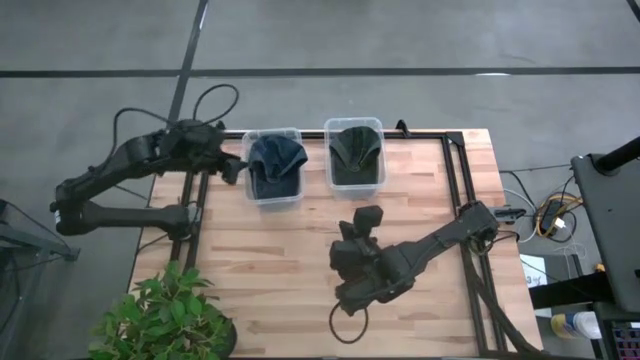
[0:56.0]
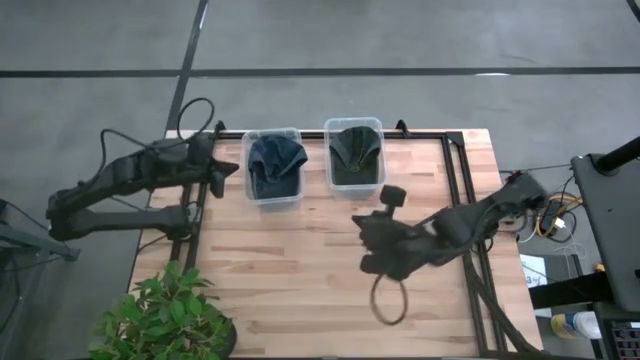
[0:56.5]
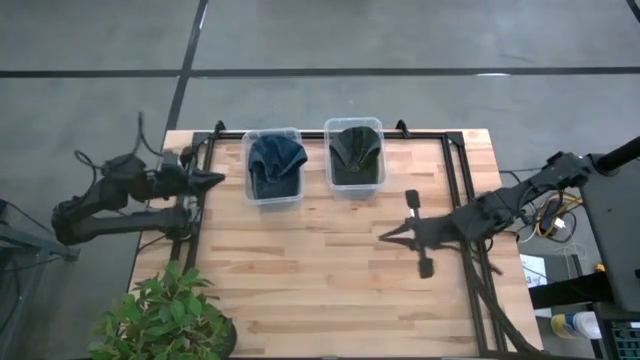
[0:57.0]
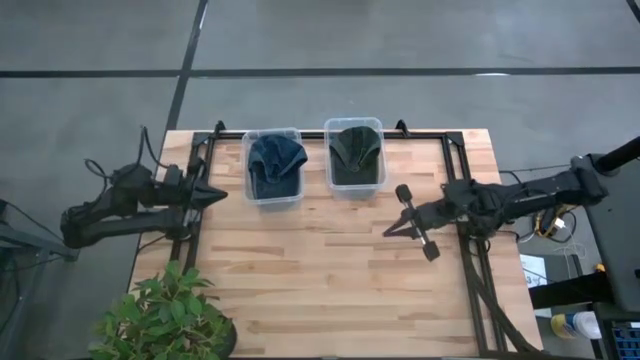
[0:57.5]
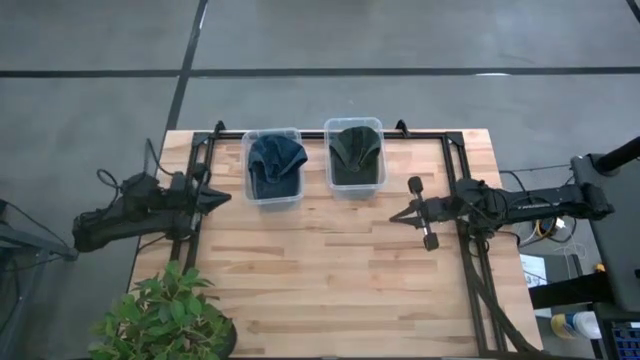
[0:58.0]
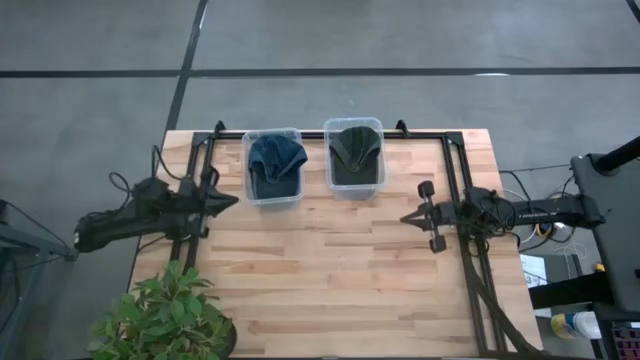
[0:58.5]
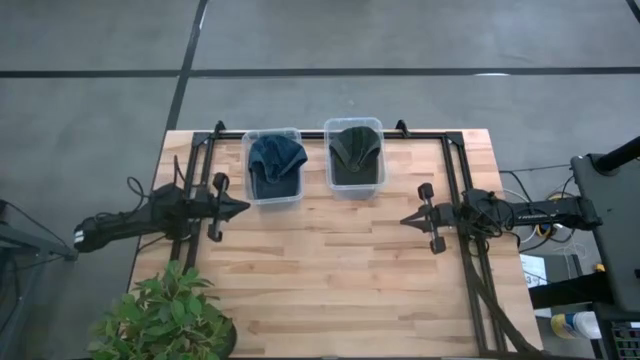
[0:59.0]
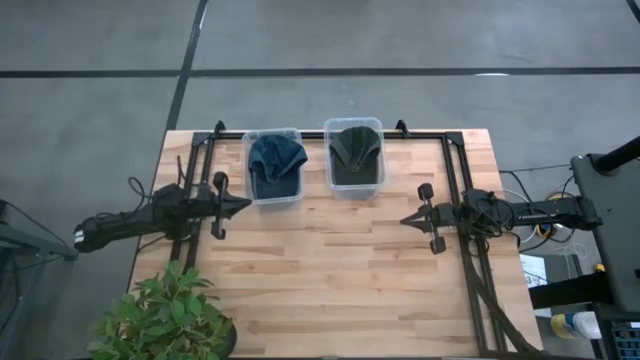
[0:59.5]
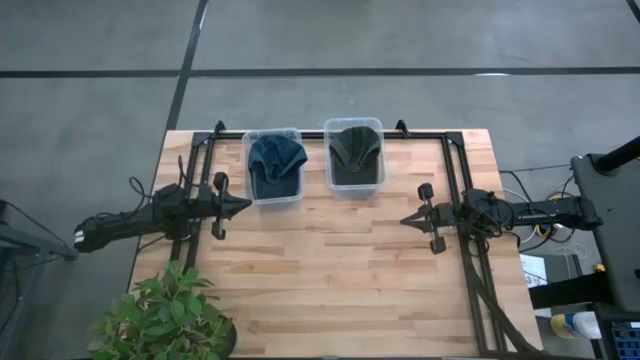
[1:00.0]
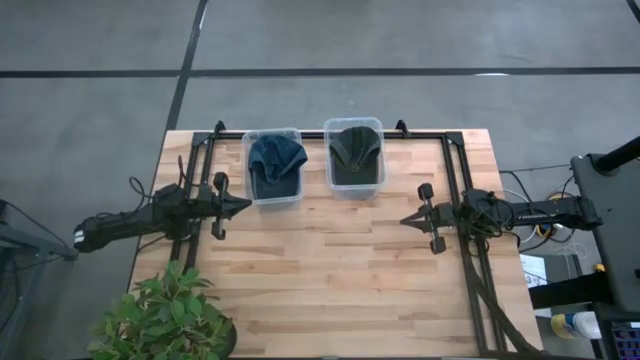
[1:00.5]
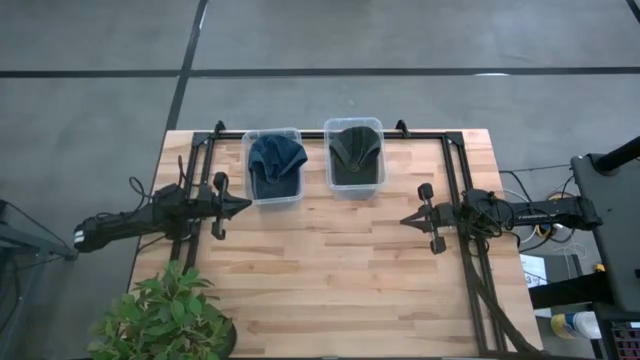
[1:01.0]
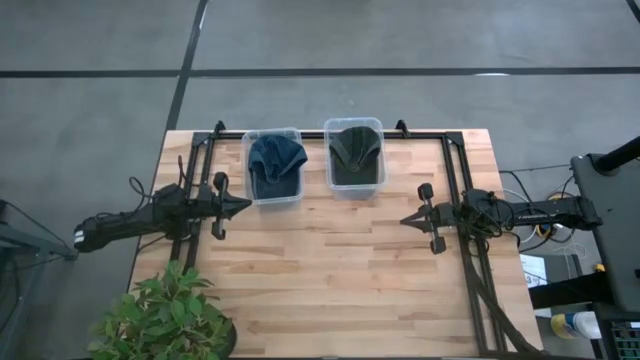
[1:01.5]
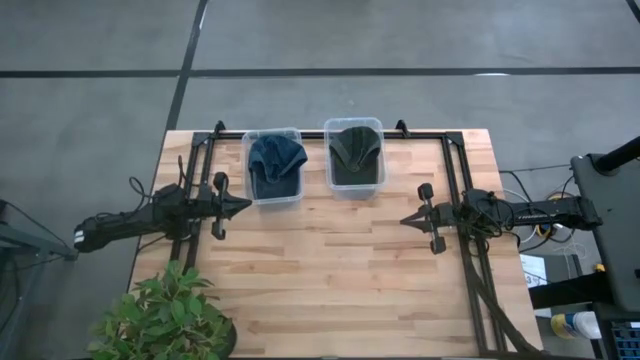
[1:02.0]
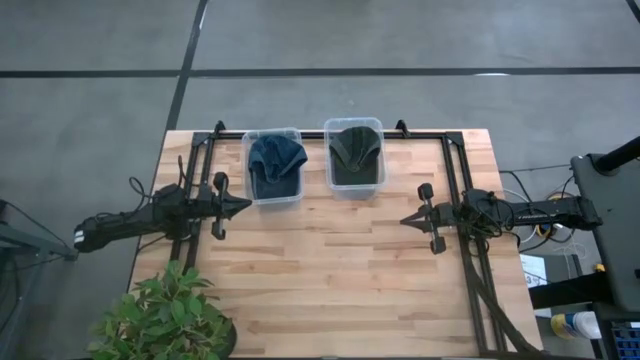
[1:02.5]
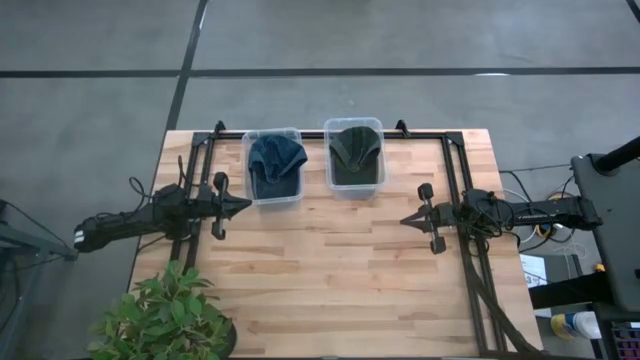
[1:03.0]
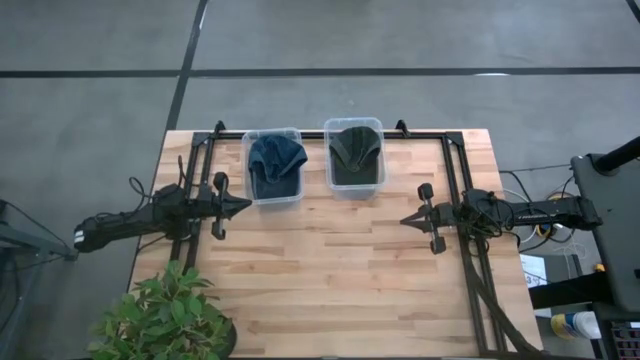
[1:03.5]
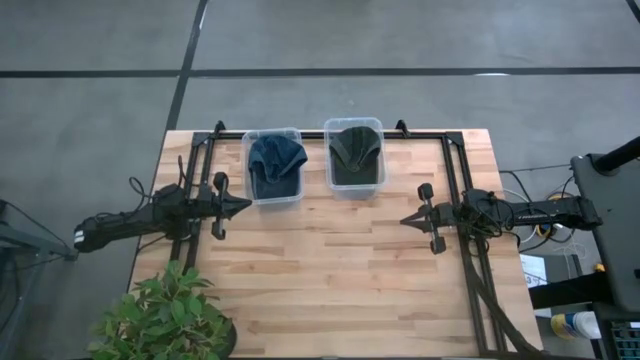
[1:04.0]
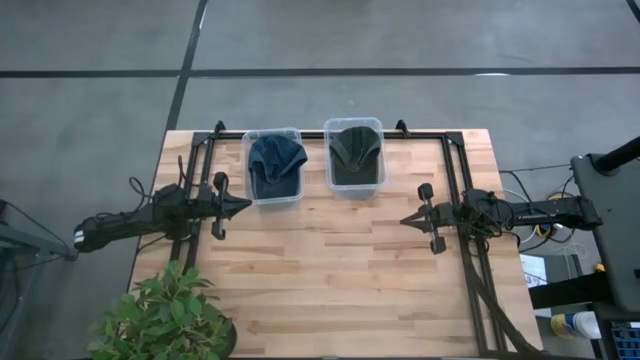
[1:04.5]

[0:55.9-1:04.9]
Task: Pick & Place hat
Return to Home Position

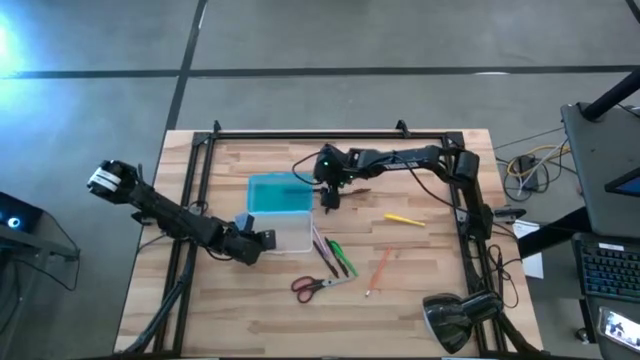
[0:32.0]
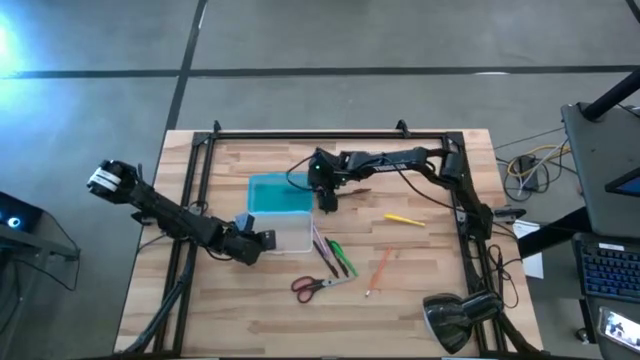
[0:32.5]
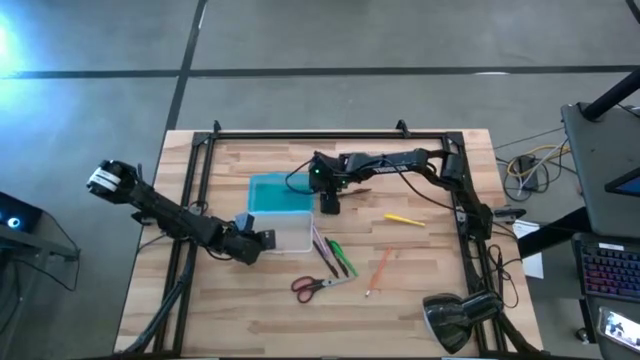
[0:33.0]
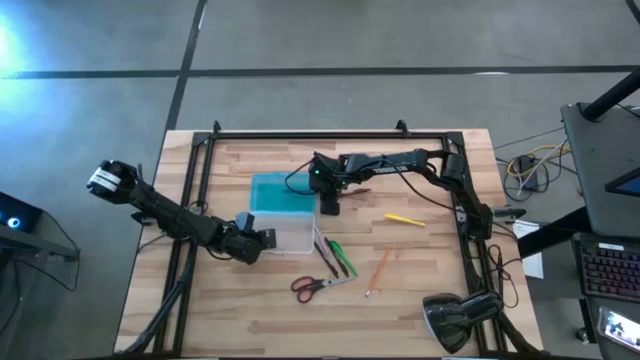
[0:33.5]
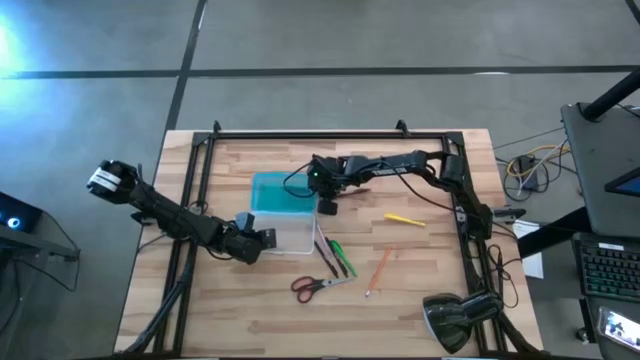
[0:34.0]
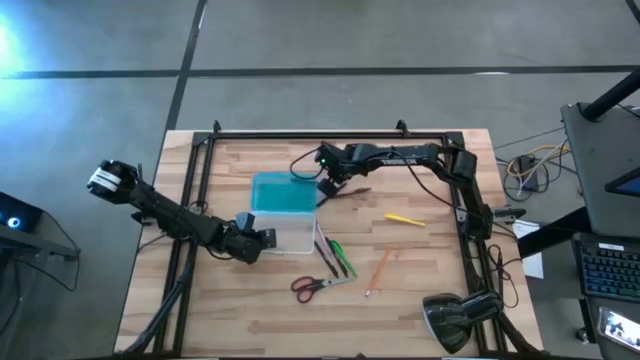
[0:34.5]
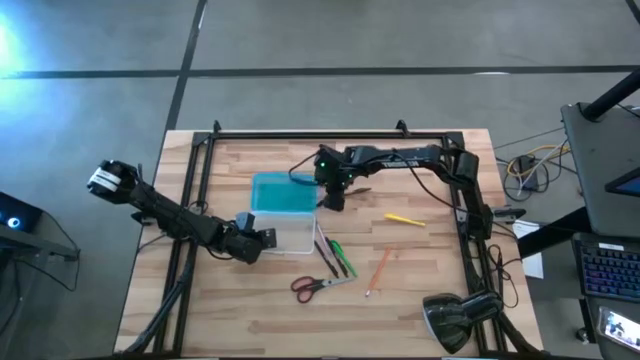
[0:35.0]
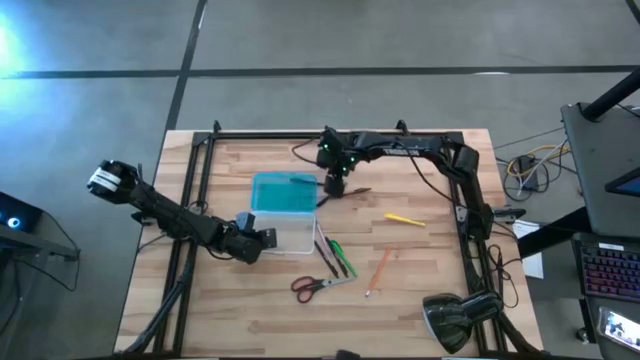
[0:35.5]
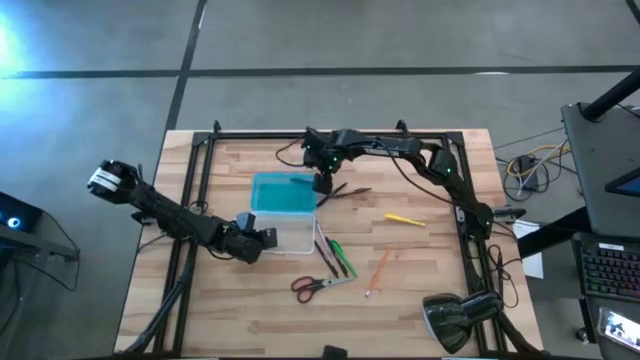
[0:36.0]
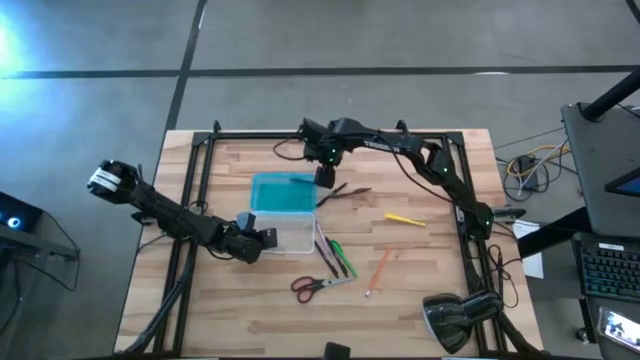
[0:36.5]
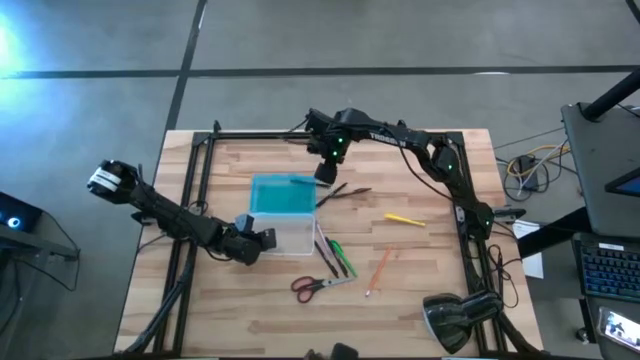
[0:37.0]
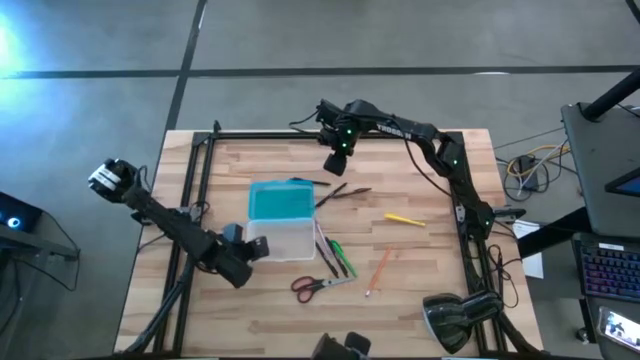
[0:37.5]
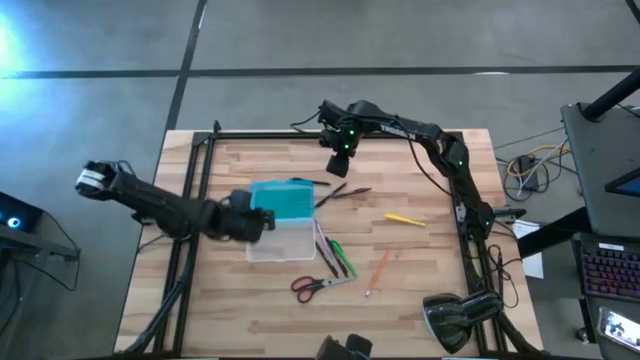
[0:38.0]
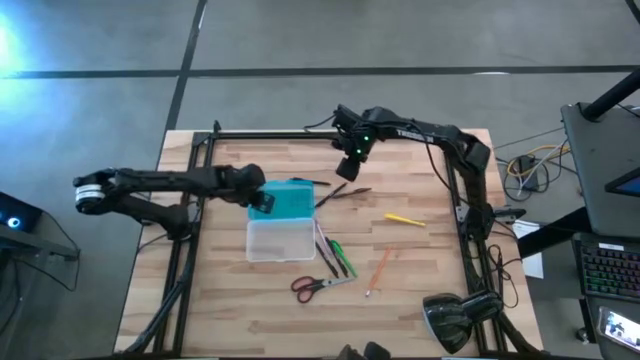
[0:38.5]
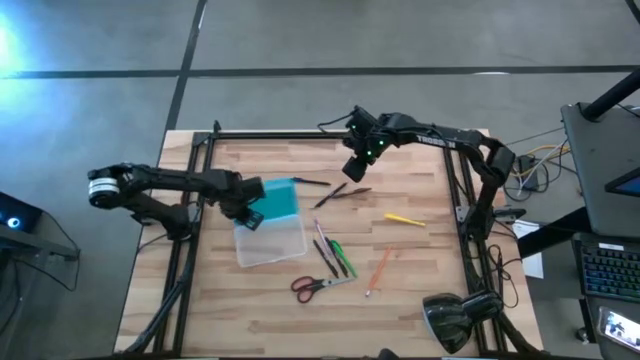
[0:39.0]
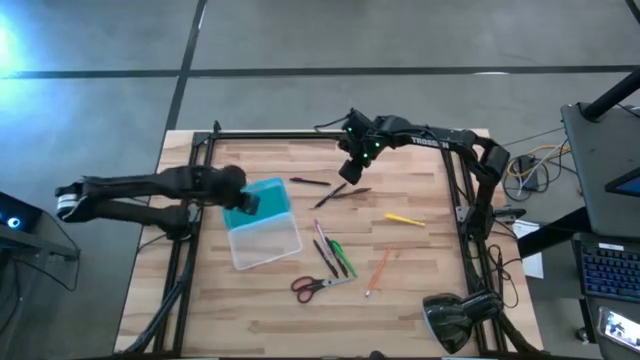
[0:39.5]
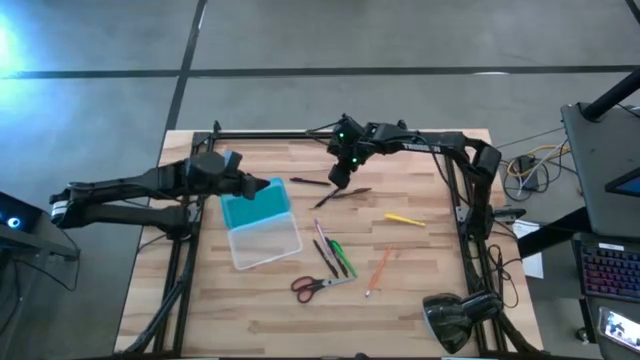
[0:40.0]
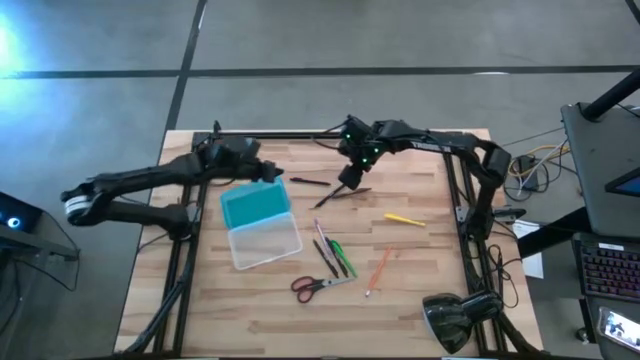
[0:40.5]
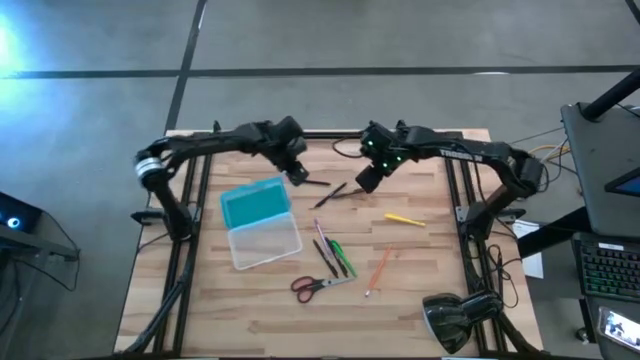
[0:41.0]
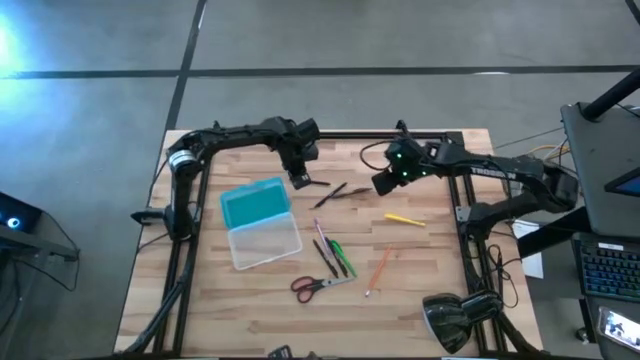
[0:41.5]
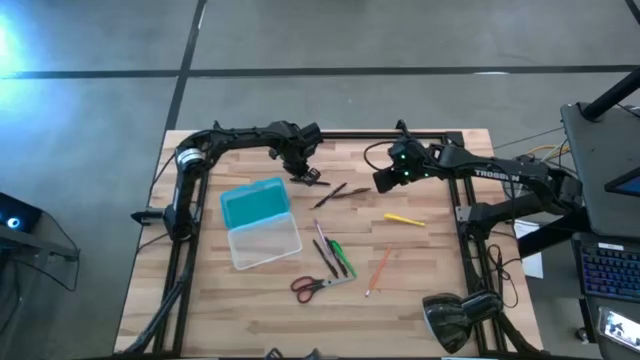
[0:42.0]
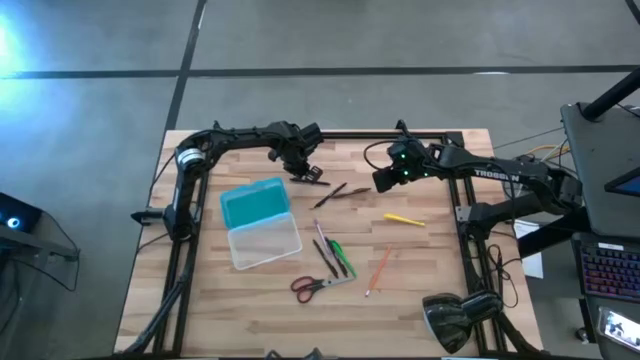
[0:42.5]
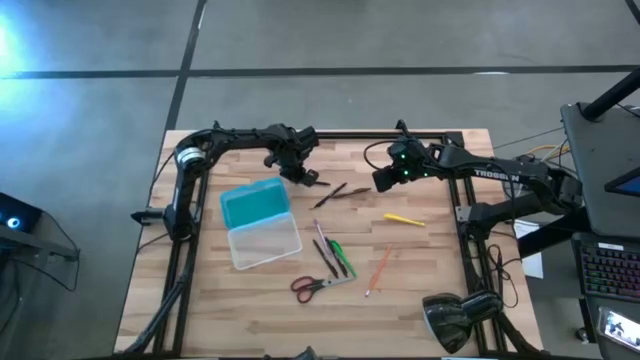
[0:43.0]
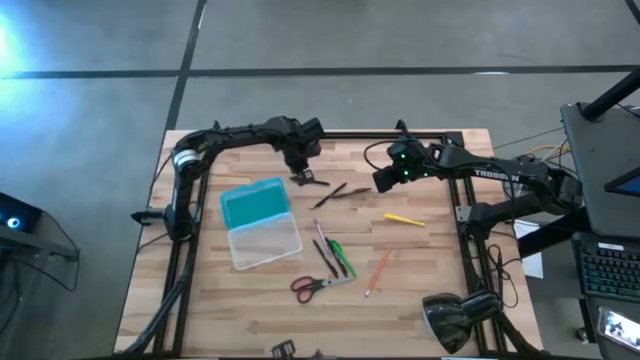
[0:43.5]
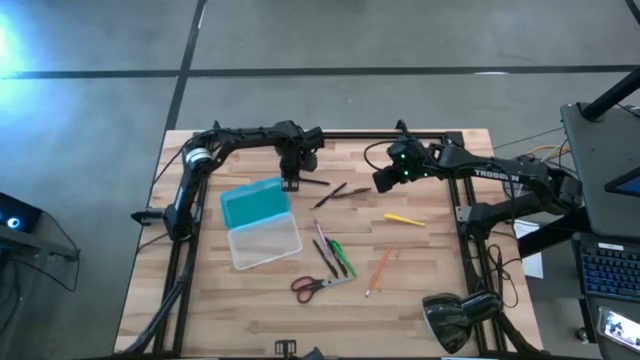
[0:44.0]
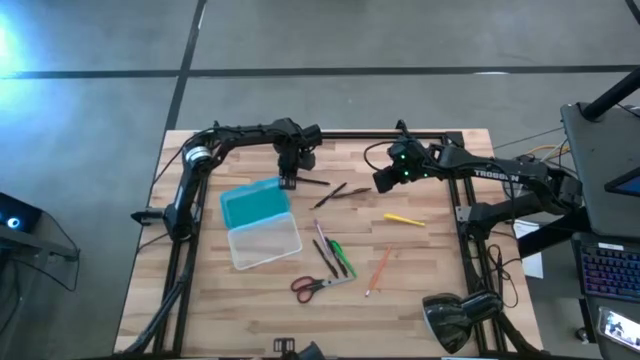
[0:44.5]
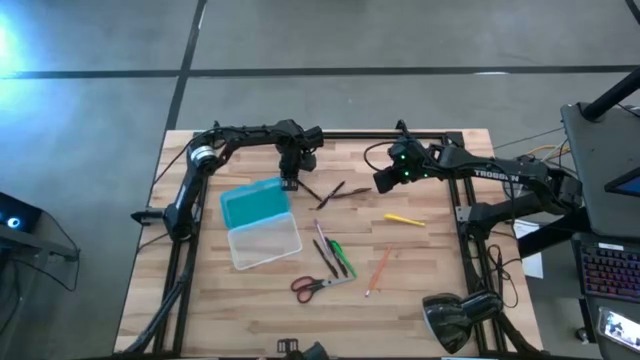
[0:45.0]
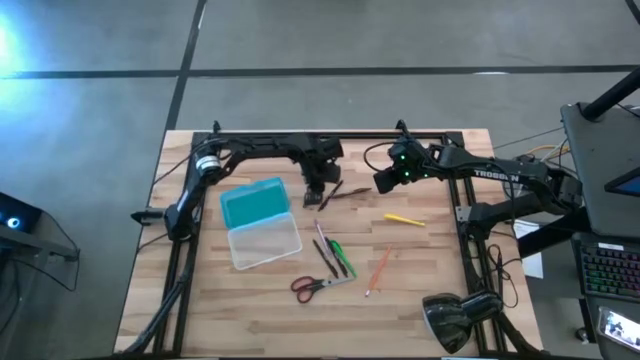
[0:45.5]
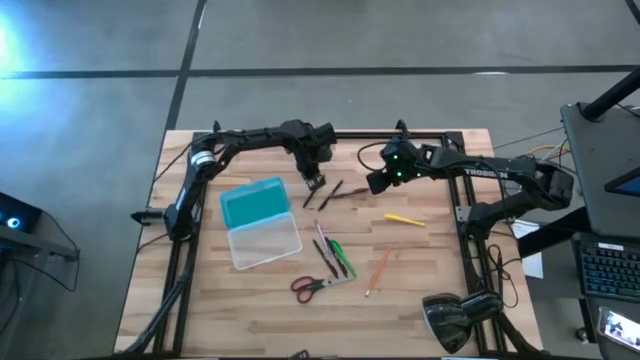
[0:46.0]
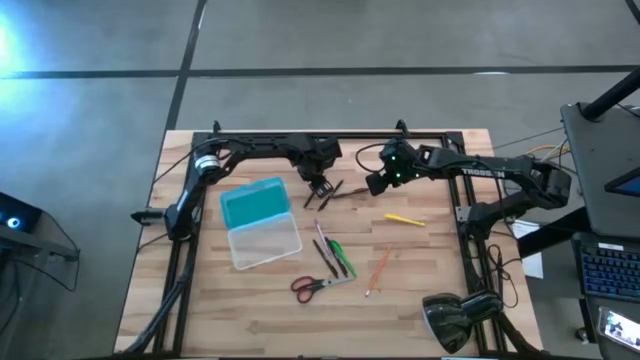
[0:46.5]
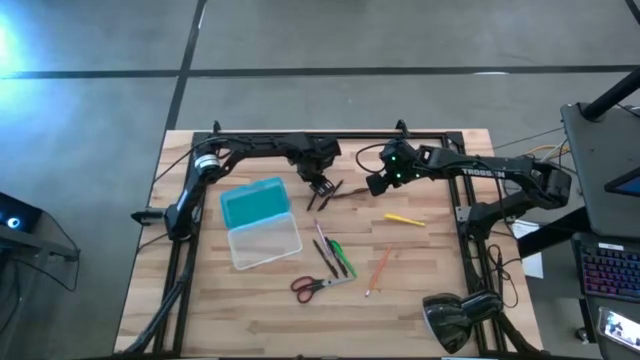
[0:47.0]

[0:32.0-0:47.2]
Task: Pick & place school supplies into a supply box
Put the black pen into the blue supply box
